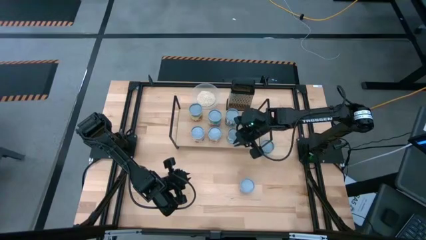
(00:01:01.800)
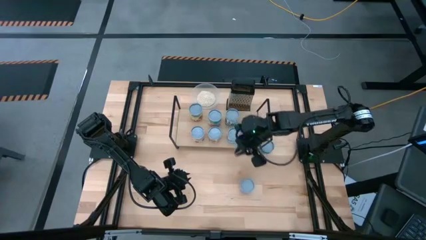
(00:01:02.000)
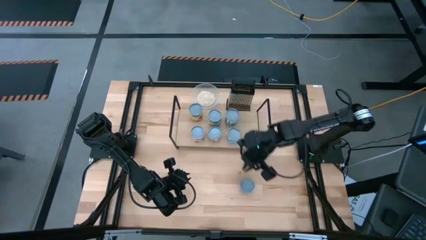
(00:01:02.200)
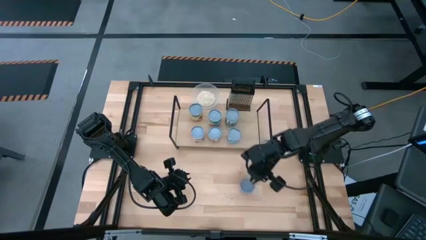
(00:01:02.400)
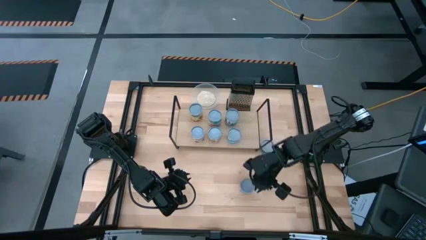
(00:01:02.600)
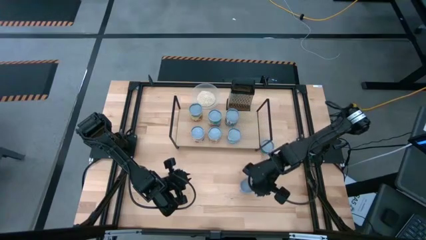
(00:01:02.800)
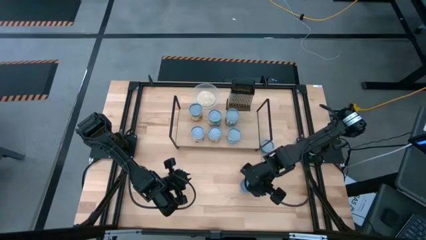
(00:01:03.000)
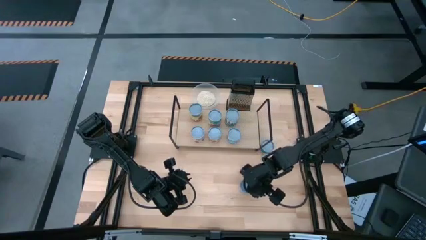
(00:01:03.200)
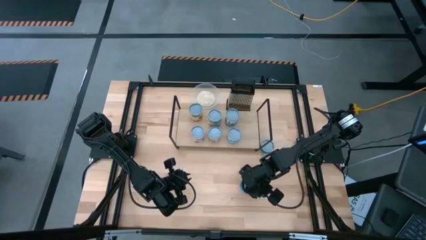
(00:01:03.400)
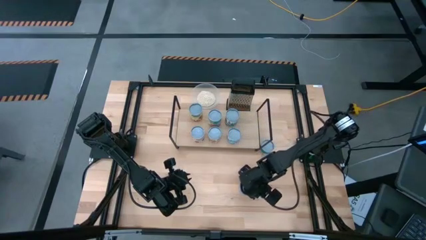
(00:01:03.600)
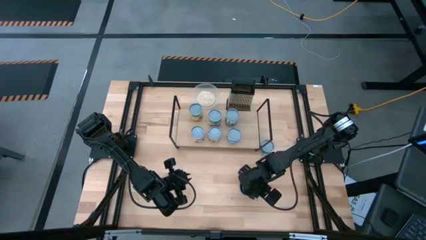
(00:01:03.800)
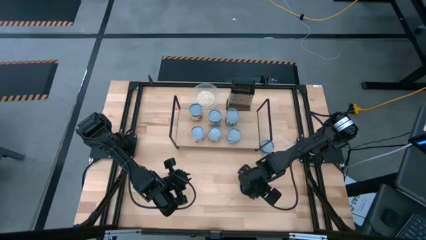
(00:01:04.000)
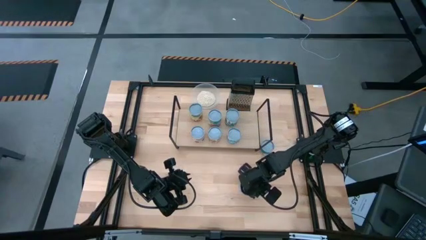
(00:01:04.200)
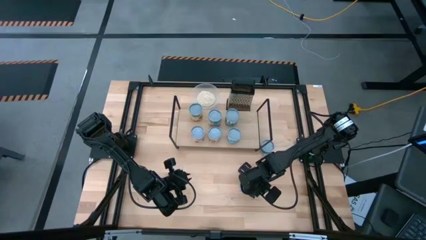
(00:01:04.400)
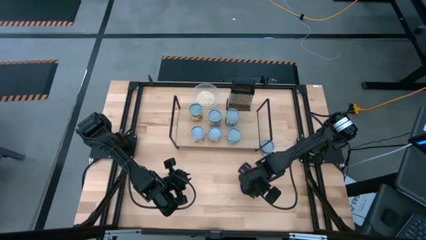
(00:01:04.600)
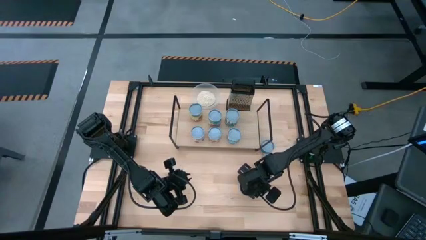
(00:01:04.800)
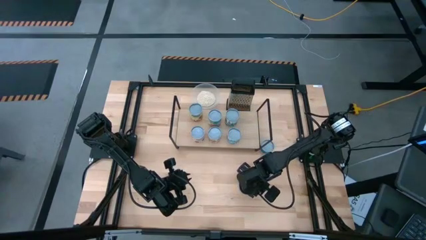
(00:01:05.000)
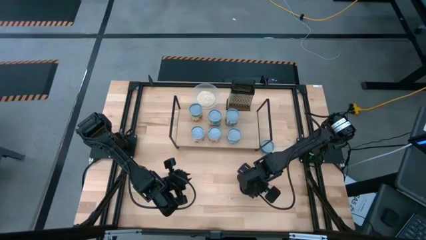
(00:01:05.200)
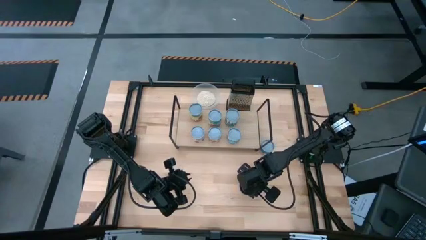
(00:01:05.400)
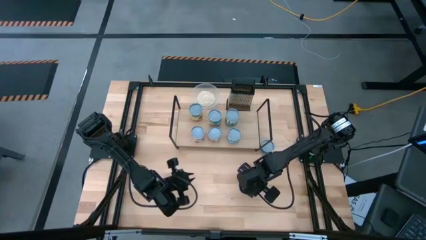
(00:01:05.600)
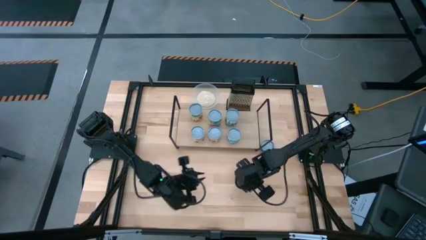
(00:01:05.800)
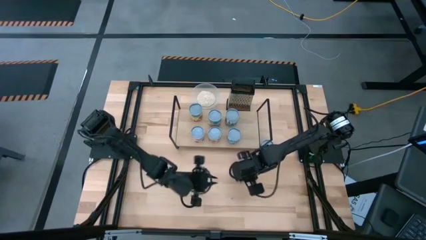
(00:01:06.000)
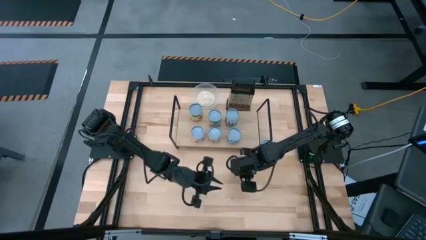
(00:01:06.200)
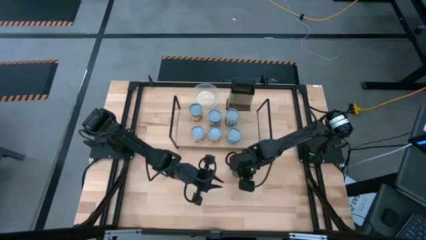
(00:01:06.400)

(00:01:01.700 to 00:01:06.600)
Task: Pick and place cans onto a shelf
Put the canned corn on the shelf

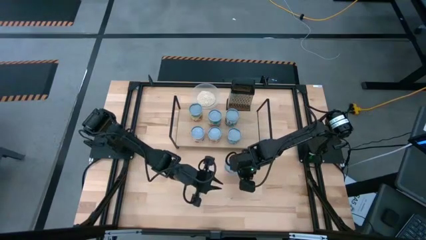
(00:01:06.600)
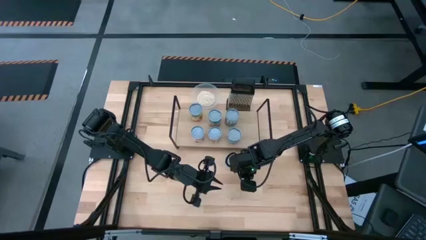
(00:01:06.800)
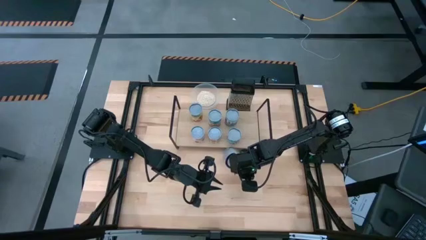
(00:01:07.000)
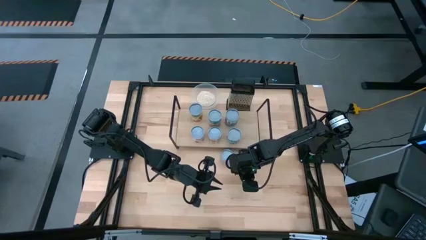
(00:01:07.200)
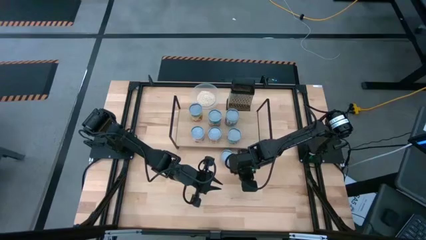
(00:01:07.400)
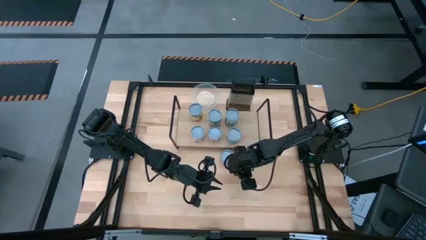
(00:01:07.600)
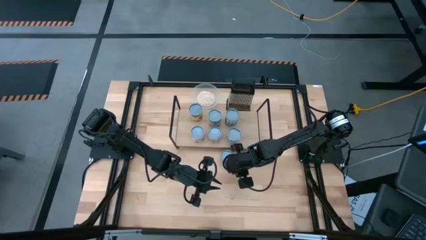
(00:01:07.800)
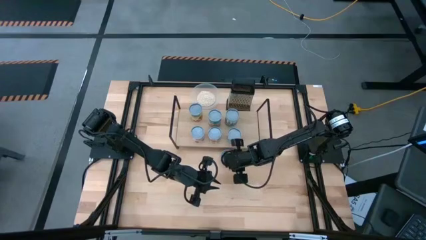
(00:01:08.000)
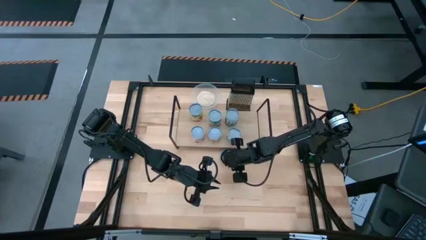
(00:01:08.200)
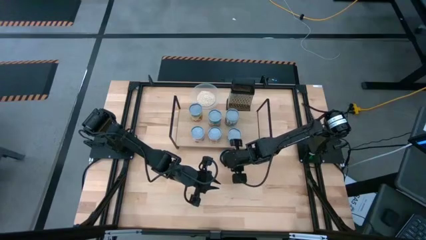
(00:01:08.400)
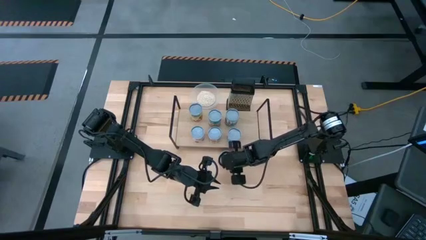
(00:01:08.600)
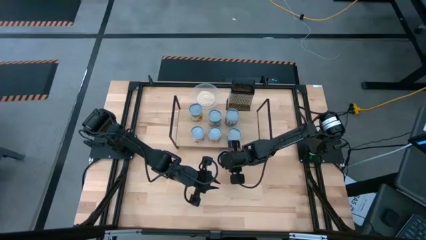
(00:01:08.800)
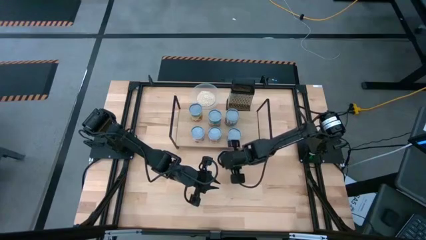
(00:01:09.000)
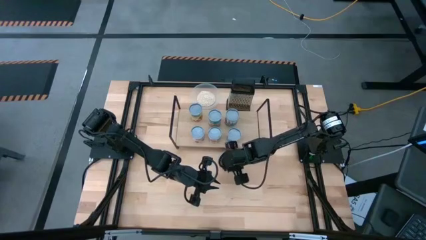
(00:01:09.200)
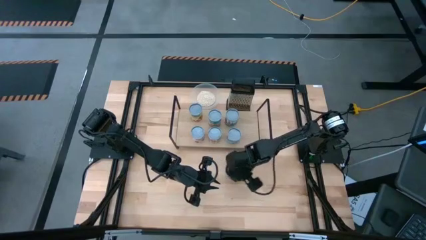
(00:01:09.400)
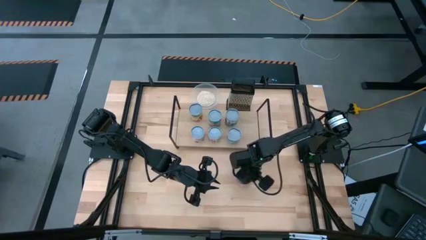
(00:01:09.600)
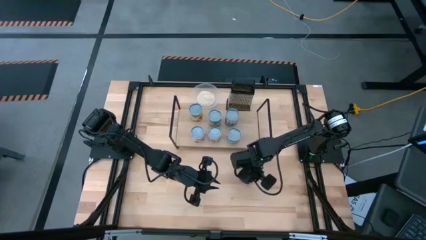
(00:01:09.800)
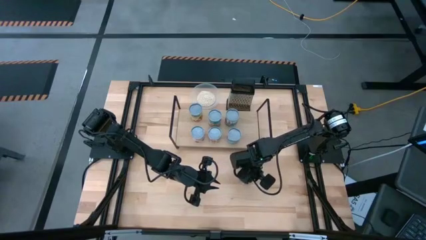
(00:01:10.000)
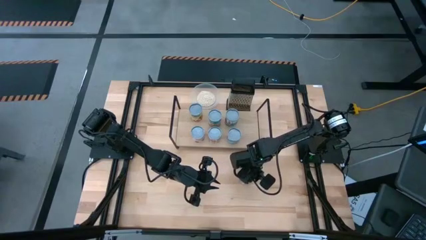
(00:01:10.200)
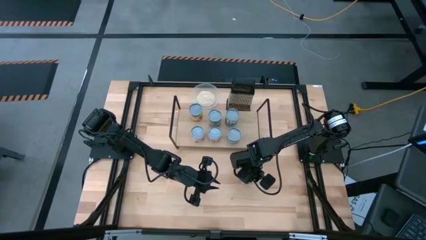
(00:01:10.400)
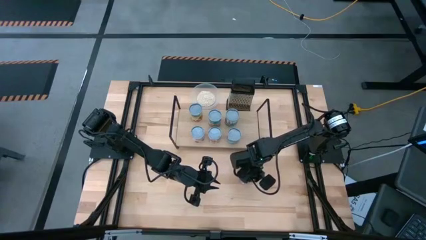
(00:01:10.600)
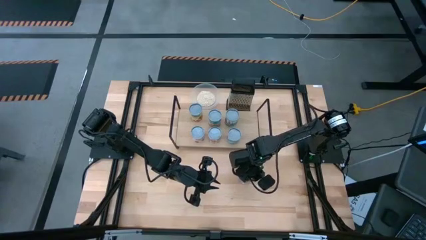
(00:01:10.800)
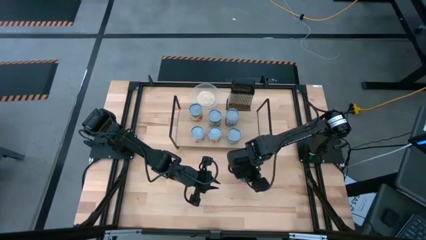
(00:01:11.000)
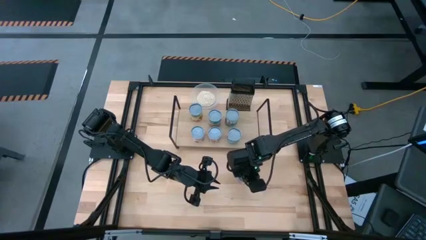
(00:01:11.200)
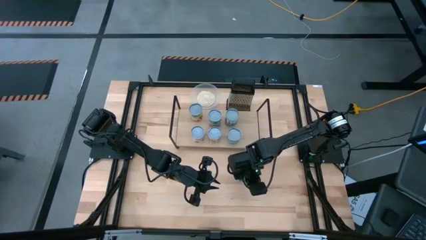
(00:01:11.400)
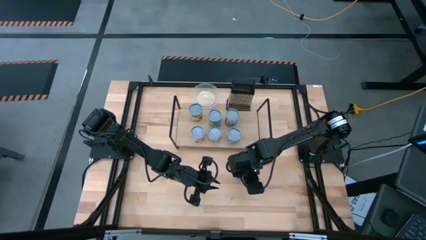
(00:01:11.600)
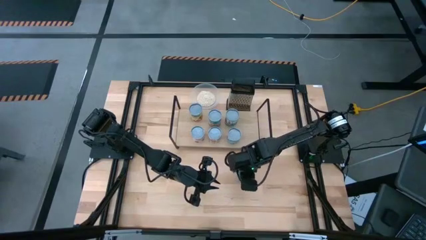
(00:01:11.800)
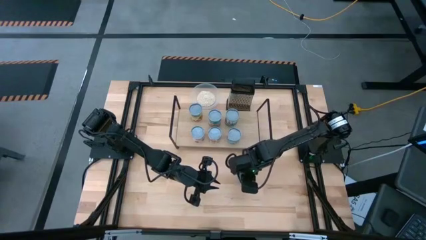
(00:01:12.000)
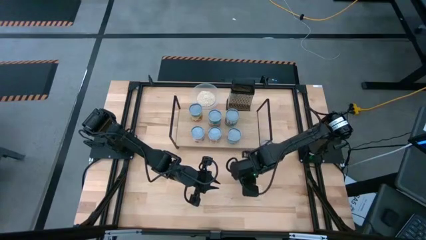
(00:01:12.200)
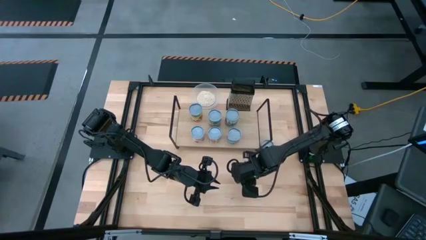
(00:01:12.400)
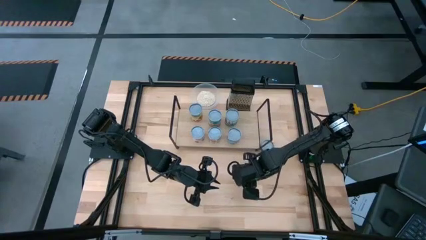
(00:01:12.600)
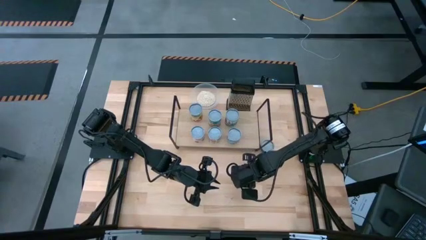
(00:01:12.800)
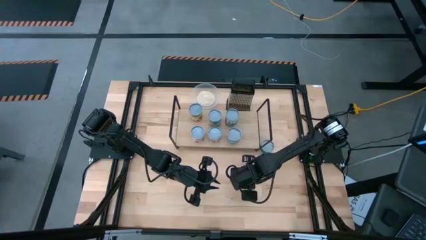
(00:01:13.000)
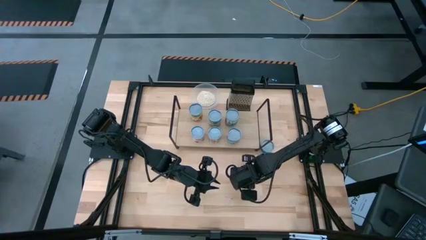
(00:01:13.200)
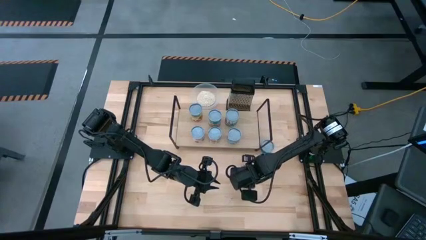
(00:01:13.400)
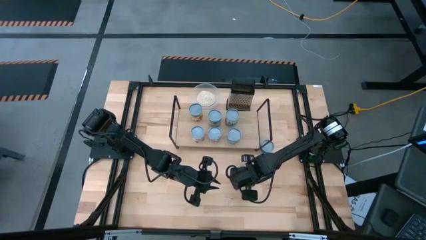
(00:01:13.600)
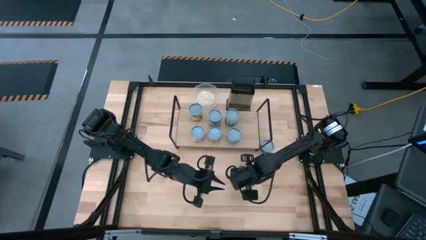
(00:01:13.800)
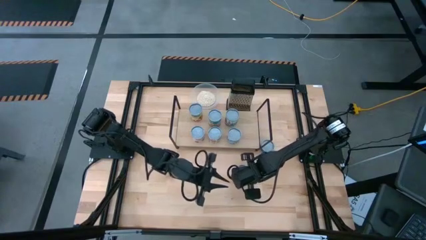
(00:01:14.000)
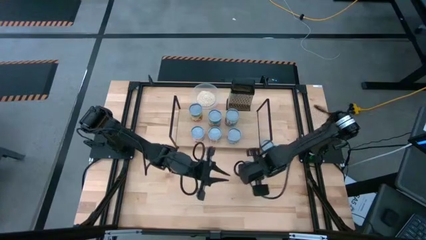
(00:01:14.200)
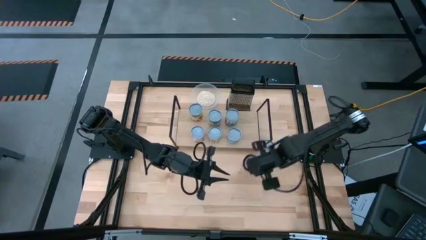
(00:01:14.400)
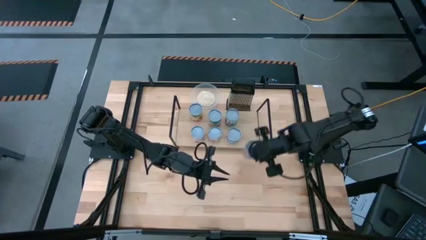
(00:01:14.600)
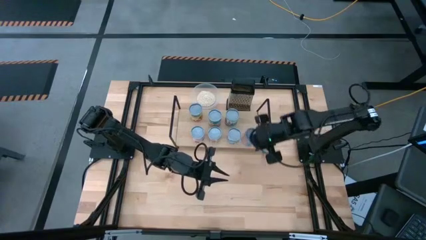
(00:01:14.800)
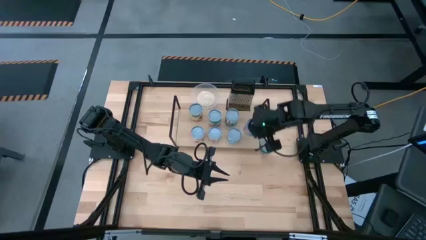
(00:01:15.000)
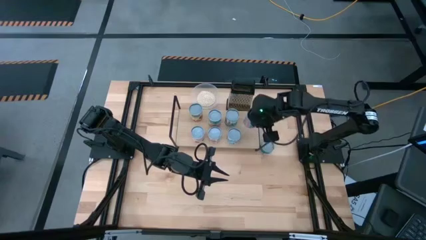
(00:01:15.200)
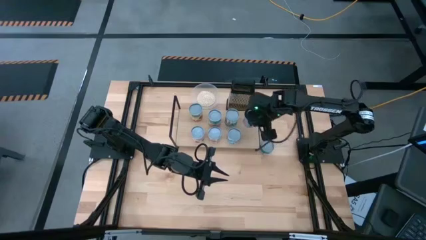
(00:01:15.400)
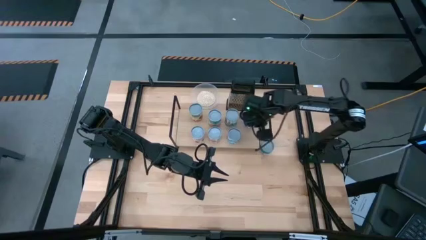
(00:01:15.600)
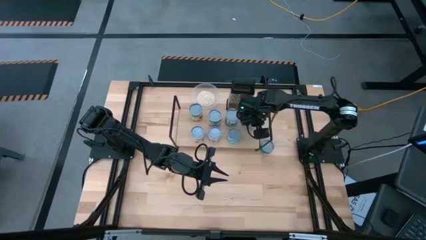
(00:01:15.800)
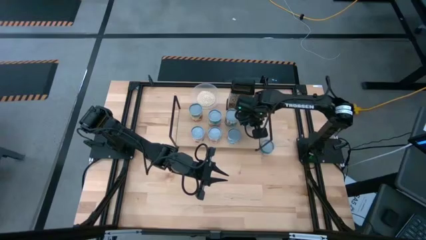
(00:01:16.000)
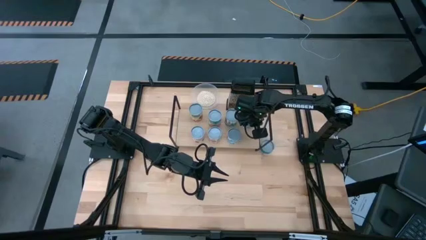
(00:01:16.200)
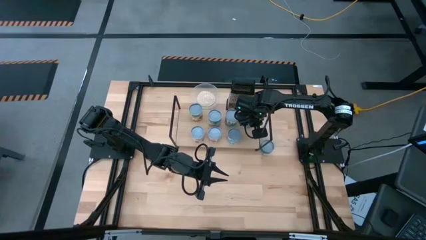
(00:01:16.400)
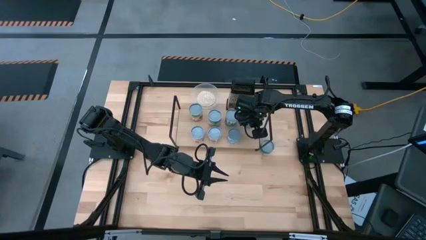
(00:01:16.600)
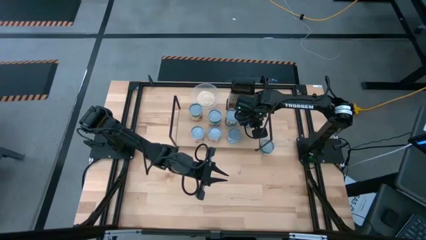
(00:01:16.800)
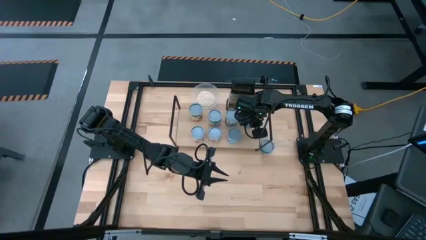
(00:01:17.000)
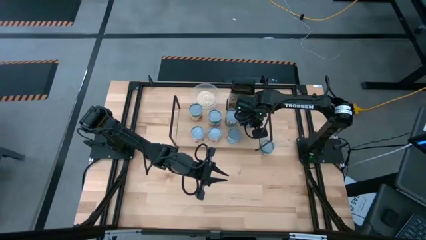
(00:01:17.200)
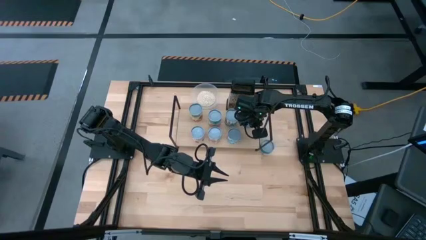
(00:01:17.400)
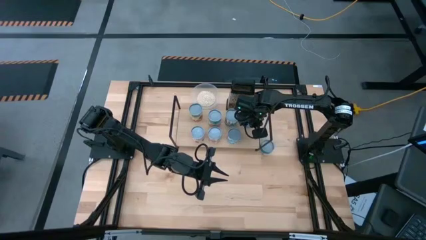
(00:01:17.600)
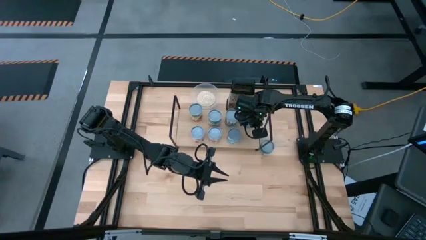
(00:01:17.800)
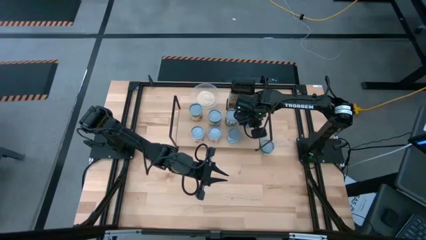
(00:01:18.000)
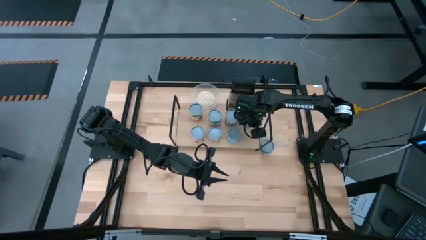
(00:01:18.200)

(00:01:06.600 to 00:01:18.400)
Put the canned corn on the shelf
